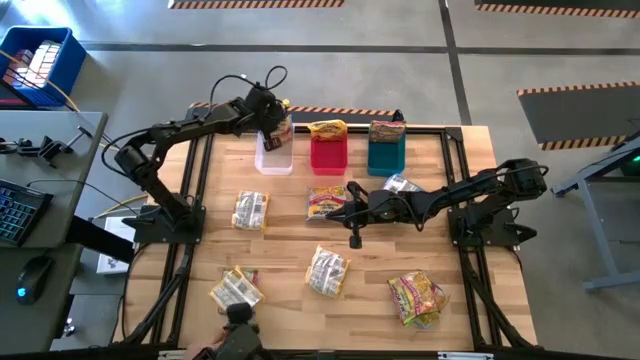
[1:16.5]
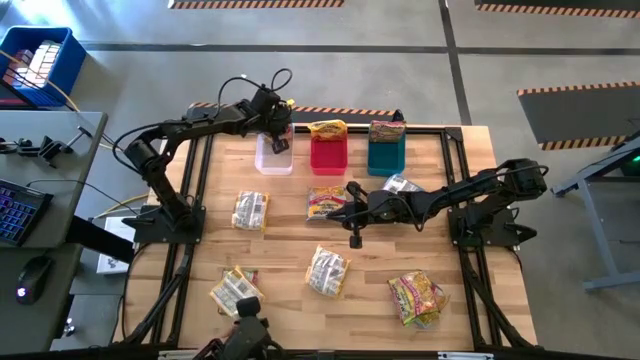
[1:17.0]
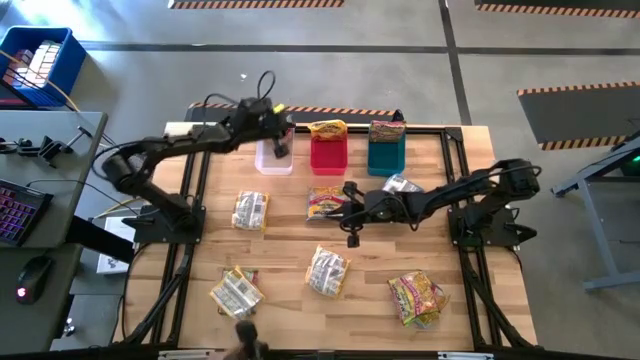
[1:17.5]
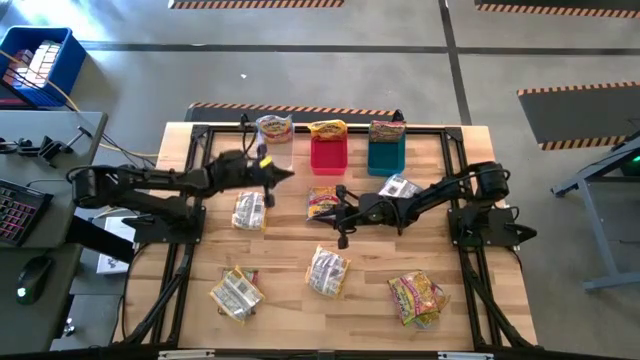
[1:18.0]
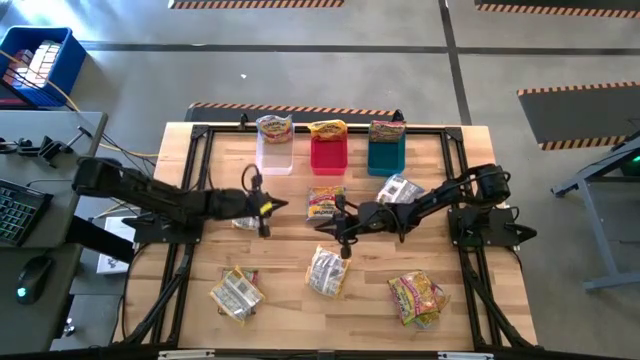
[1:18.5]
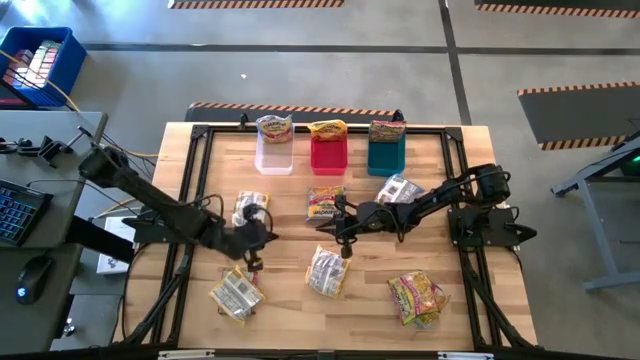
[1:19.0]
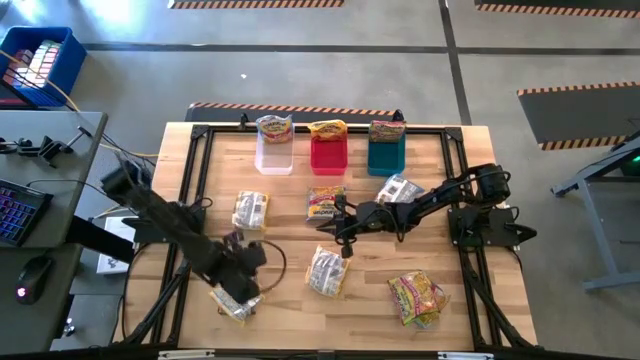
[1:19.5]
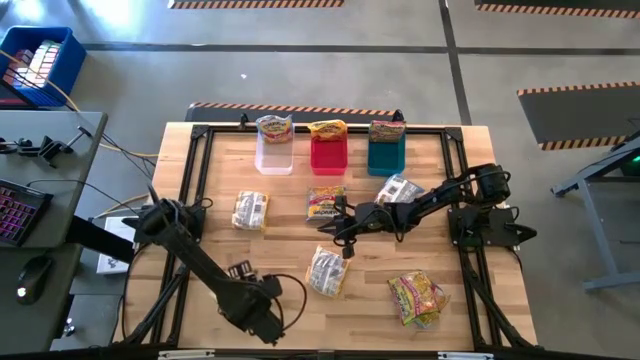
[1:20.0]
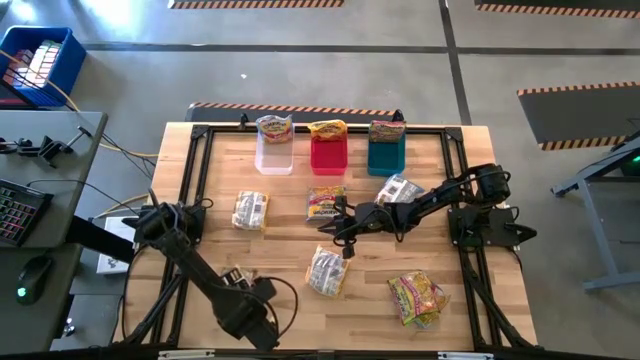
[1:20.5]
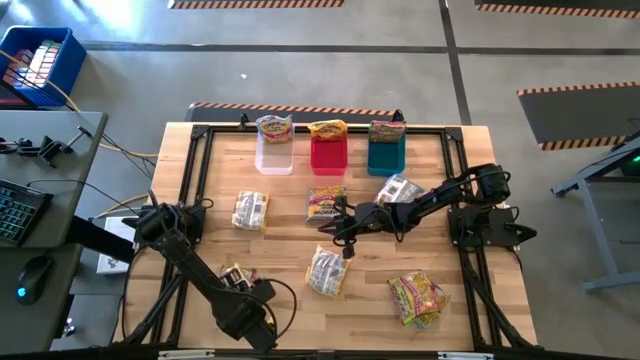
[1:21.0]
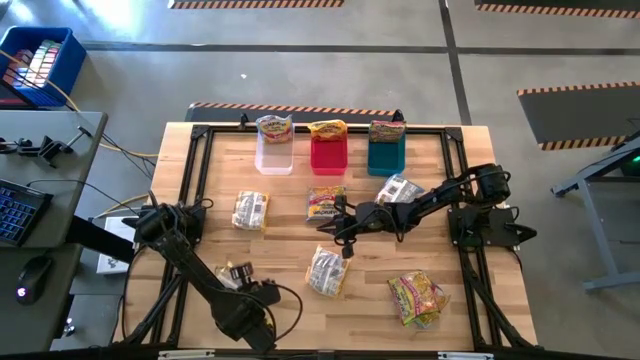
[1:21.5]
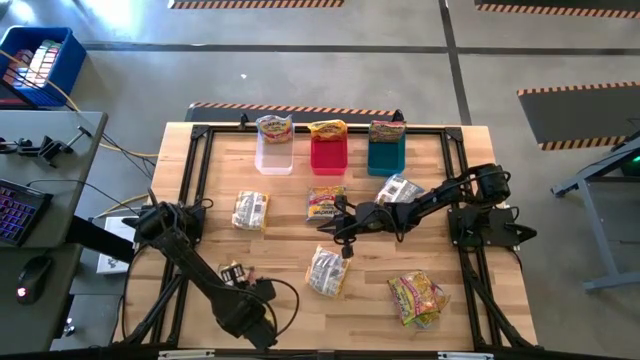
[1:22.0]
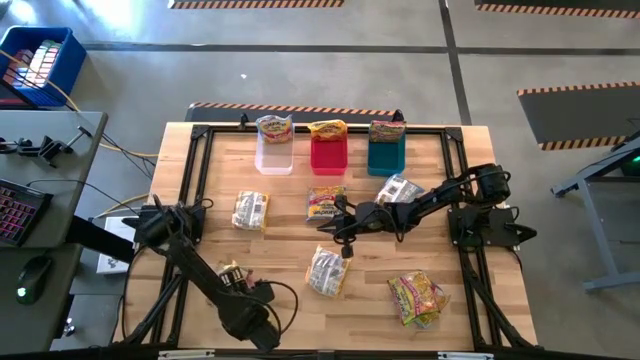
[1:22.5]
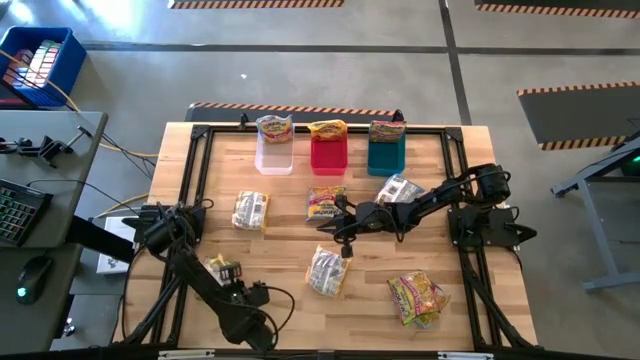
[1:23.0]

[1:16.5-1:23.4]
Task: Sort Maruchan noodles
Put the yellow noodle pack into the red bin

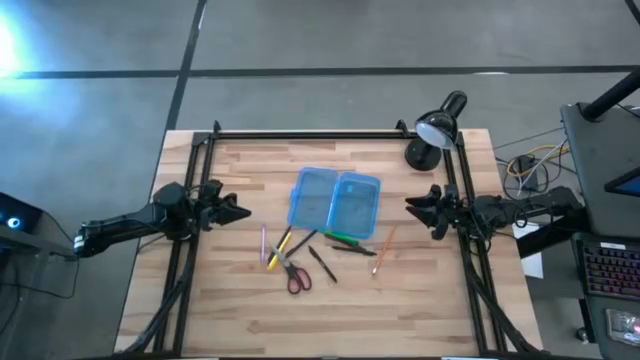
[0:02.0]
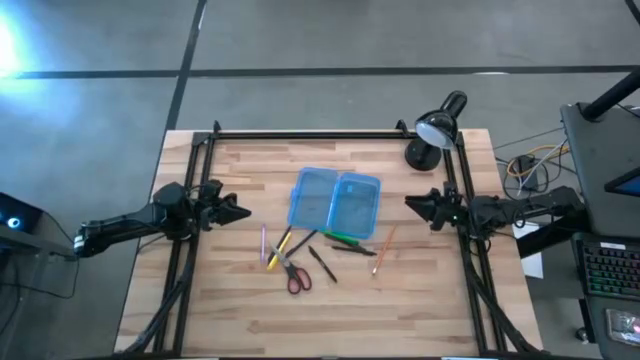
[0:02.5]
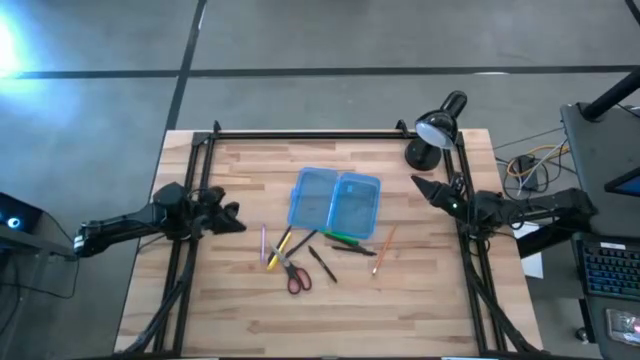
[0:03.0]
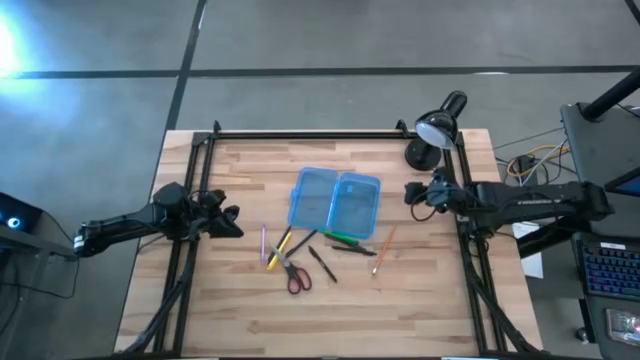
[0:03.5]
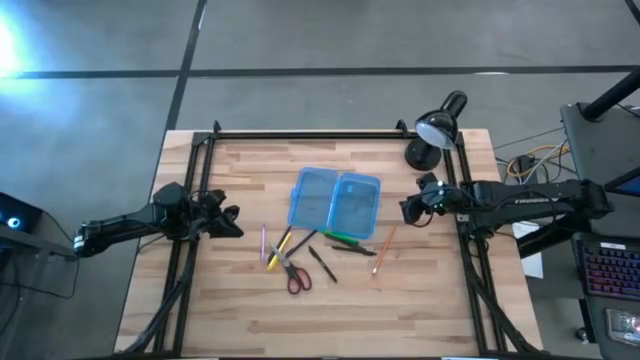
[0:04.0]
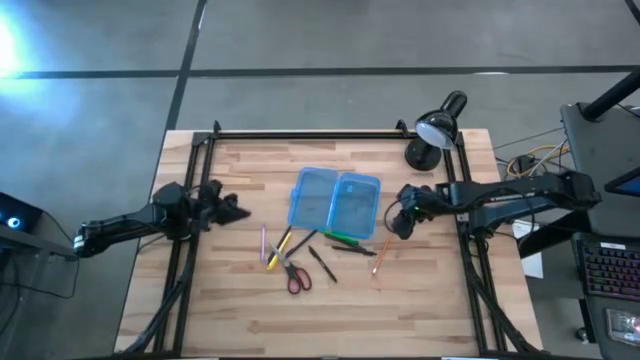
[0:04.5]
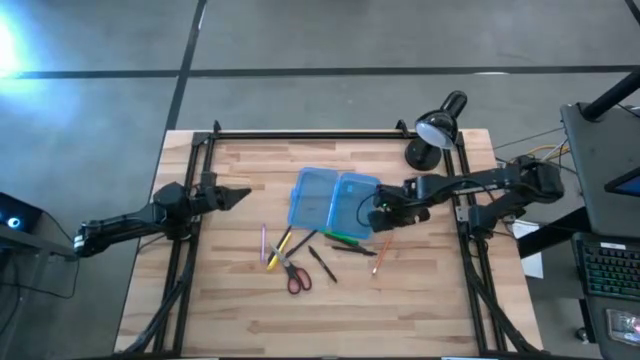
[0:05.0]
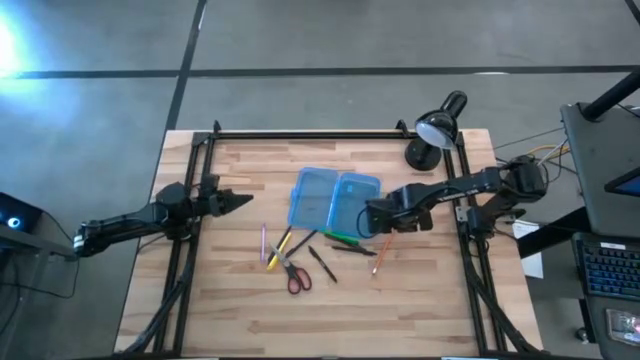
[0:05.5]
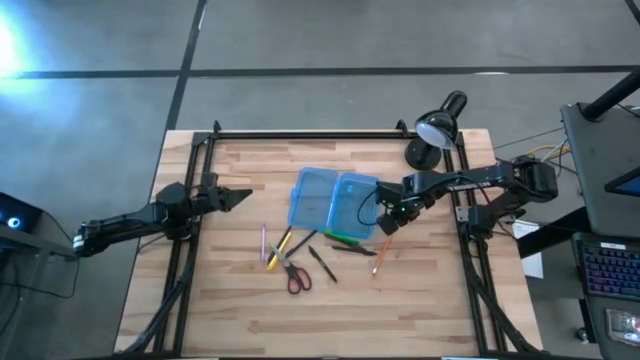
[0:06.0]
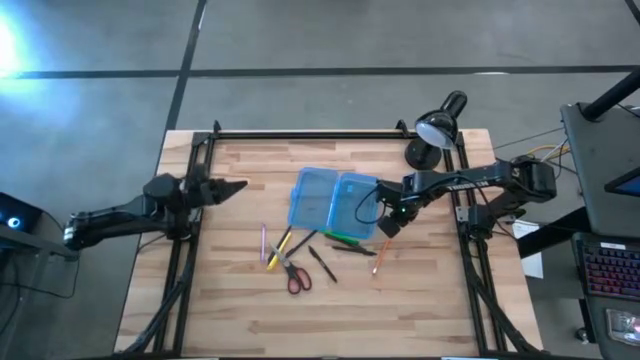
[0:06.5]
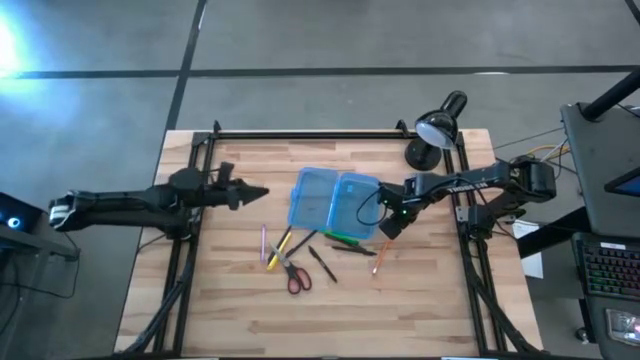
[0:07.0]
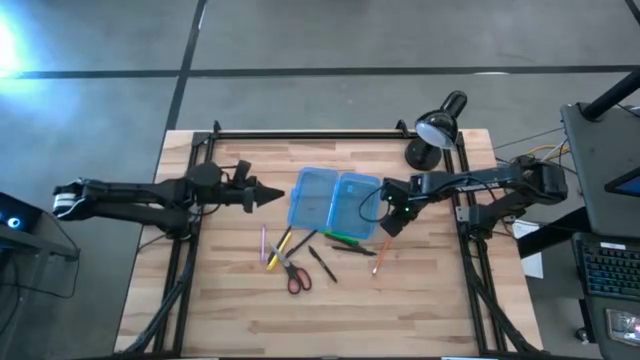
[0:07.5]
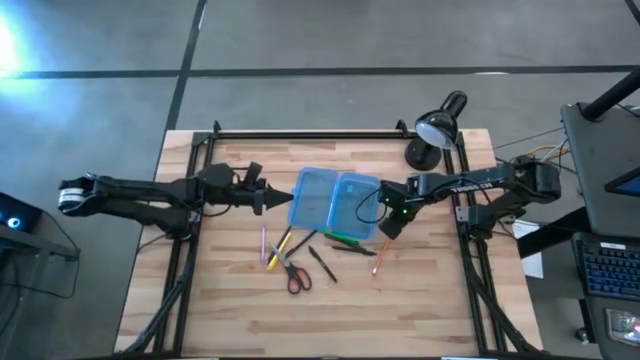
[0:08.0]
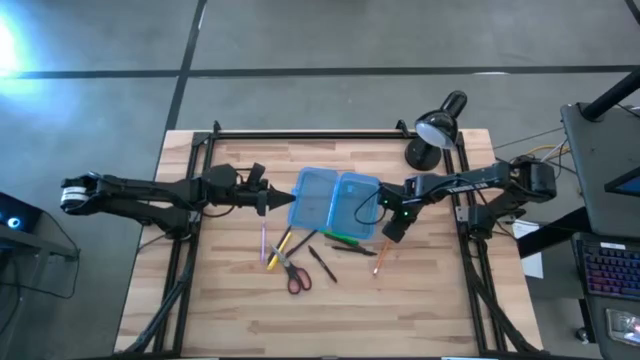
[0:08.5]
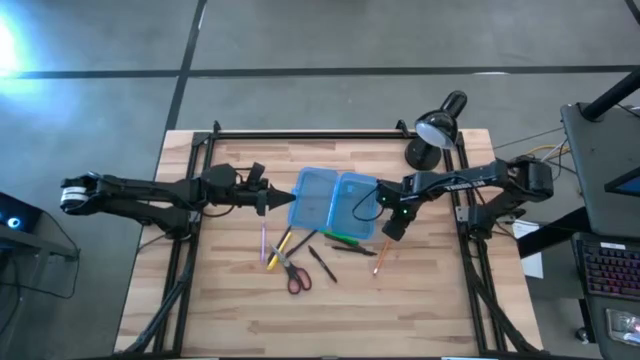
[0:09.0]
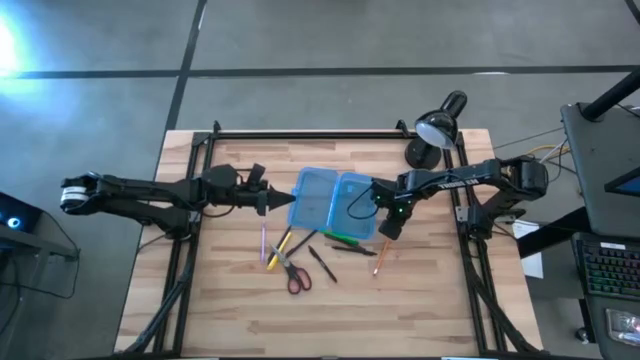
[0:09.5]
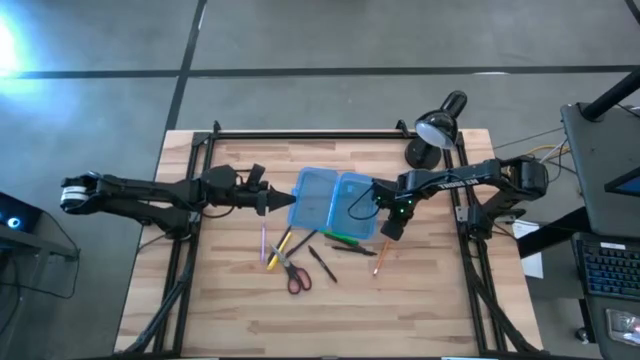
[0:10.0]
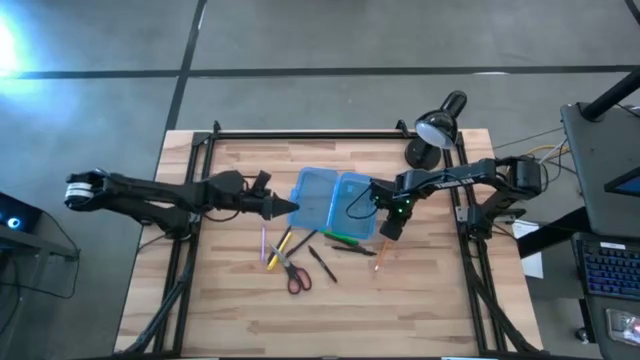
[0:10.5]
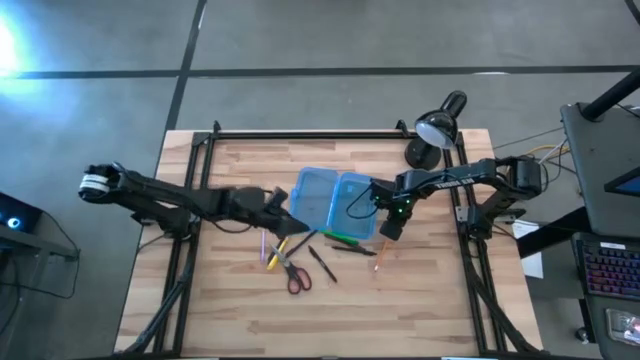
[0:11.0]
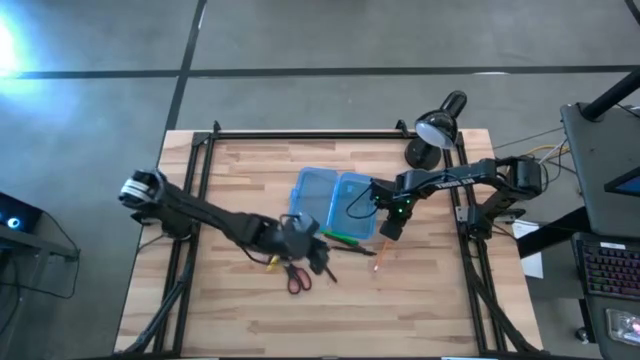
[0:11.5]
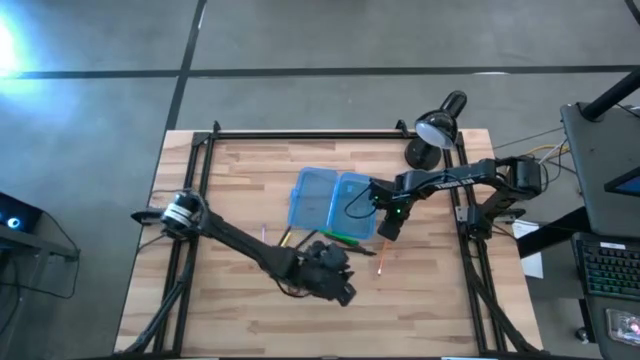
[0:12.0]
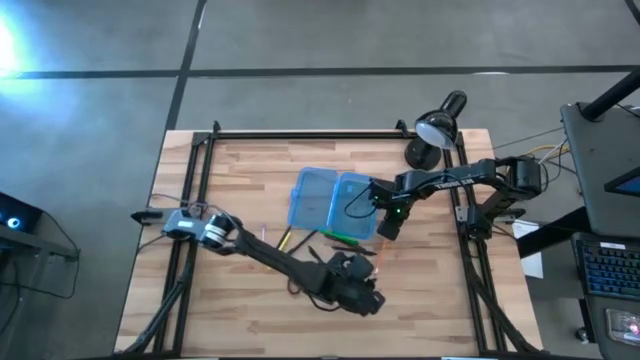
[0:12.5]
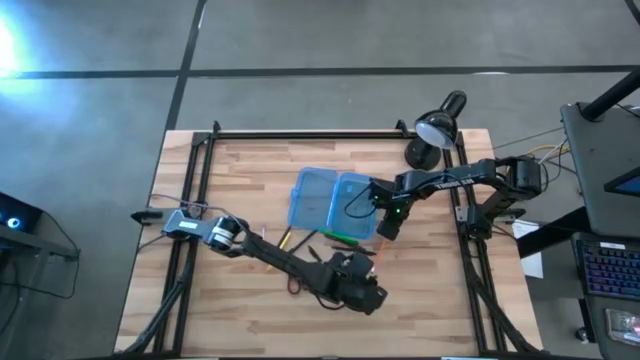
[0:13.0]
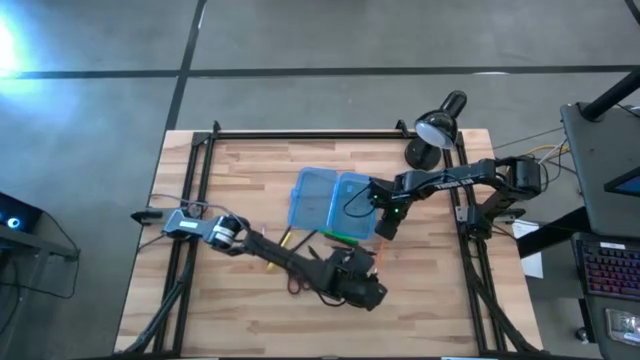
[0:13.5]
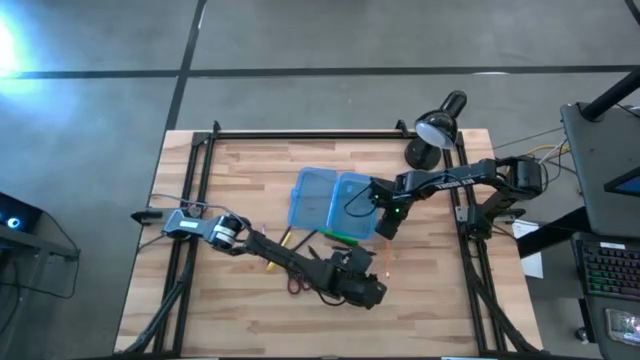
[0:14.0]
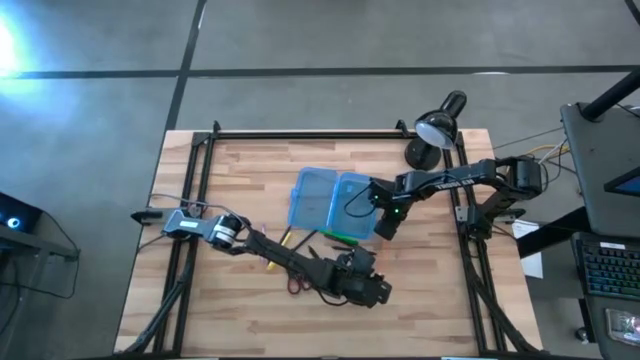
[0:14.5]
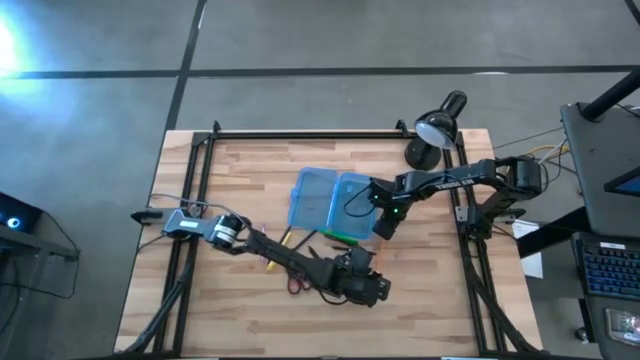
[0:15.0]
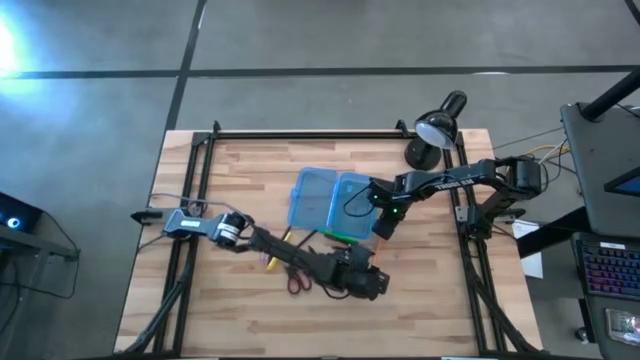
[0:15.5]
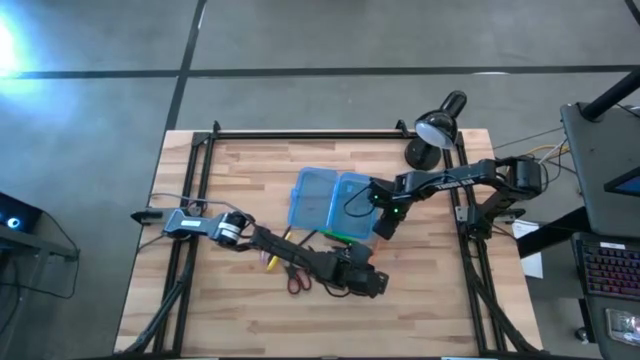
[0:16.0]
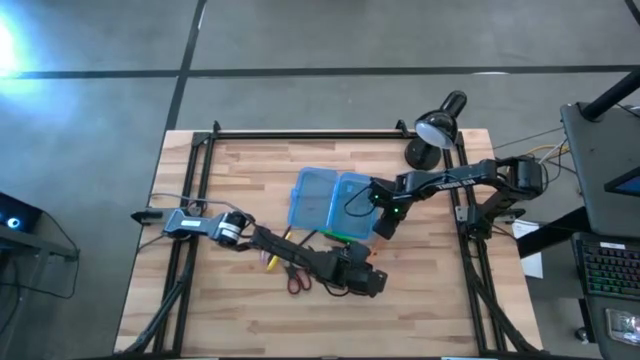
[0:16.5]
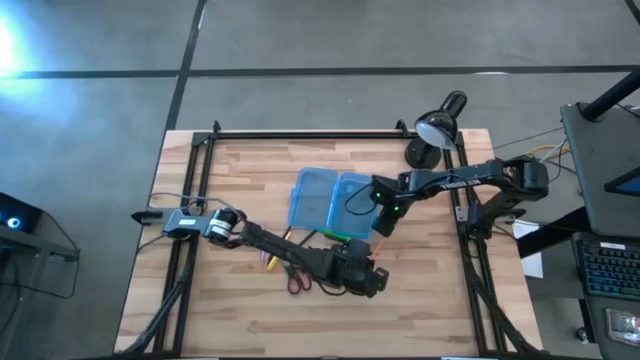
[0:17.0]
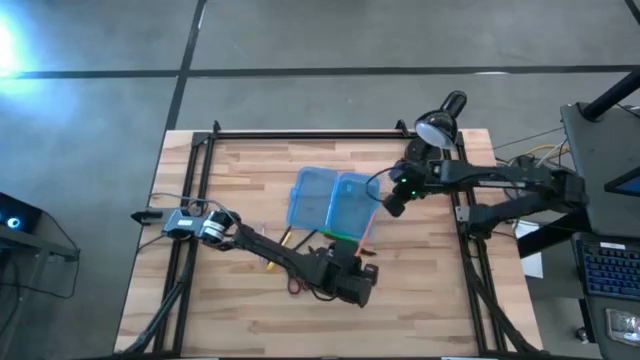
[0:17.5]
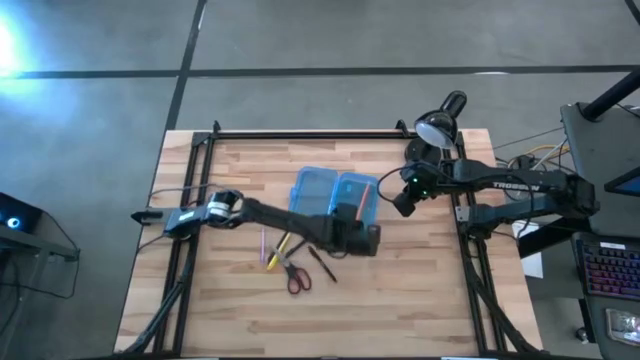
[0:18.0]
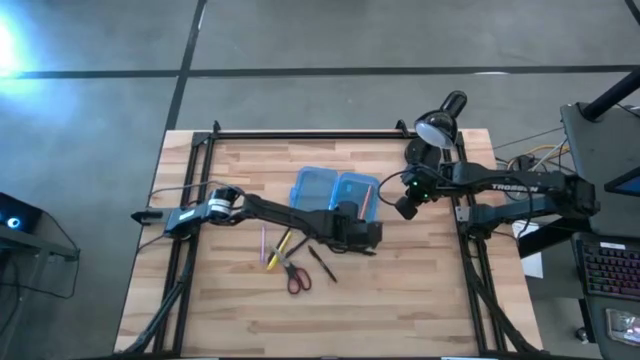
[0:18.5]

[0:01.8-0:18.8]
Task: Pick & place school supplies into a supply box
Put the yellow pencil into the supply box
